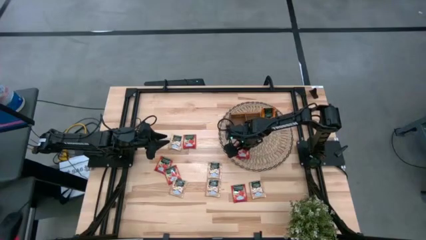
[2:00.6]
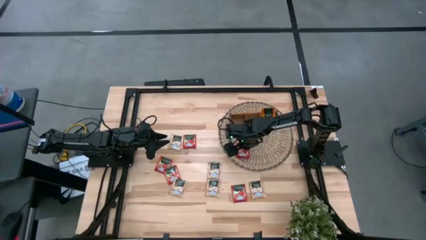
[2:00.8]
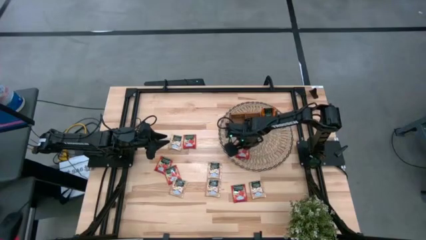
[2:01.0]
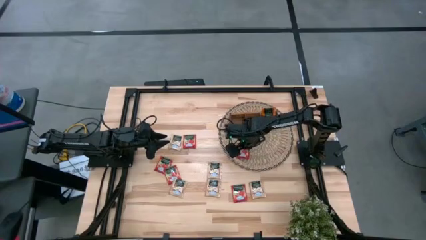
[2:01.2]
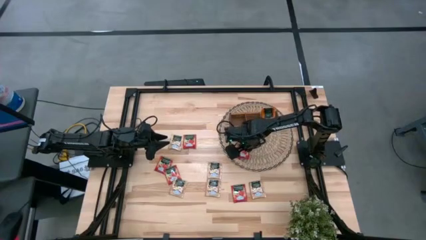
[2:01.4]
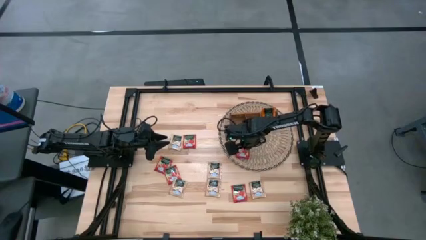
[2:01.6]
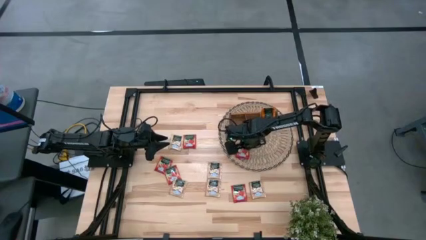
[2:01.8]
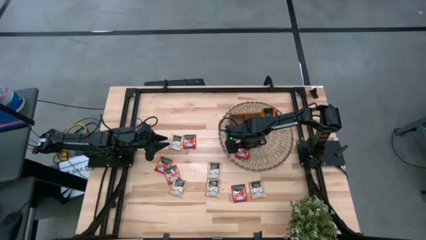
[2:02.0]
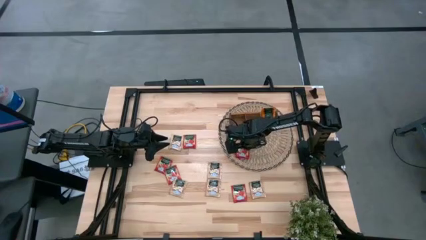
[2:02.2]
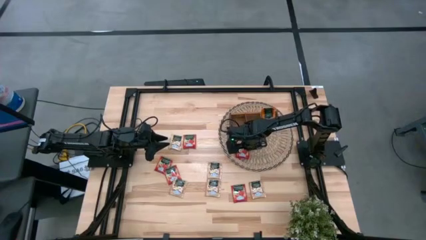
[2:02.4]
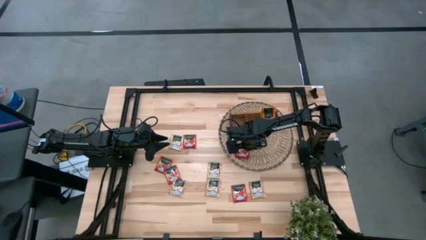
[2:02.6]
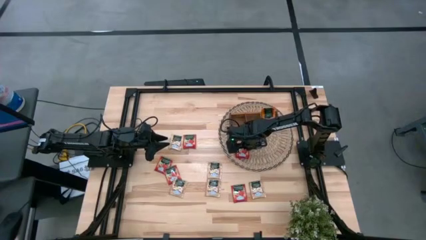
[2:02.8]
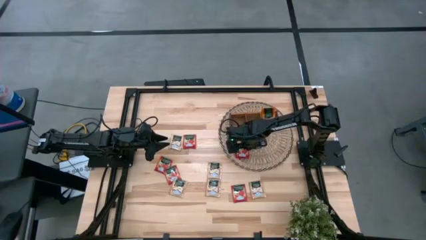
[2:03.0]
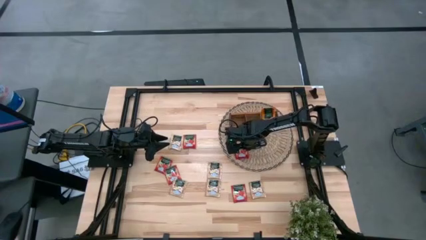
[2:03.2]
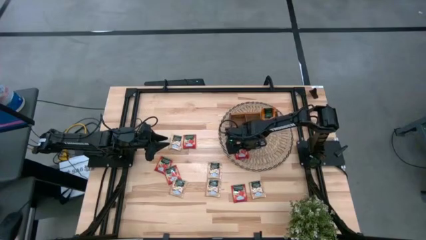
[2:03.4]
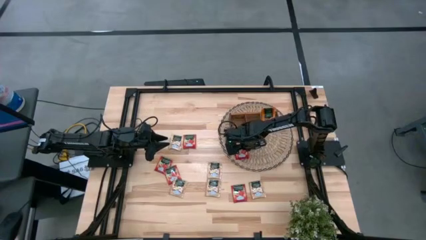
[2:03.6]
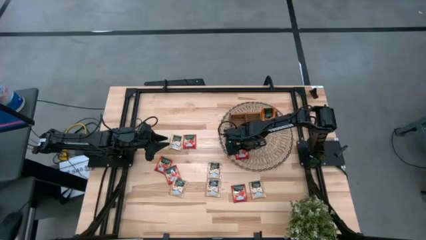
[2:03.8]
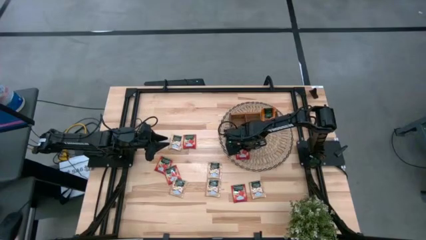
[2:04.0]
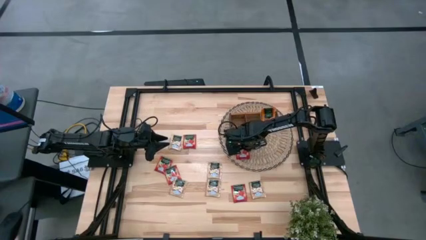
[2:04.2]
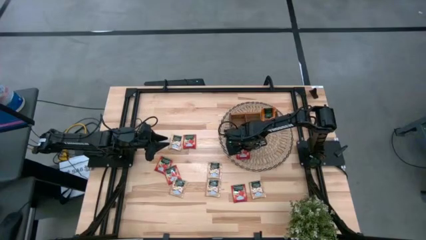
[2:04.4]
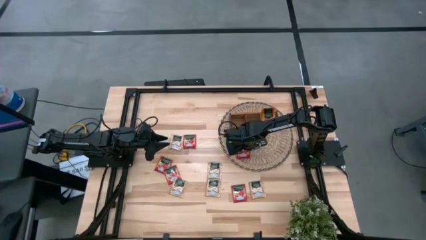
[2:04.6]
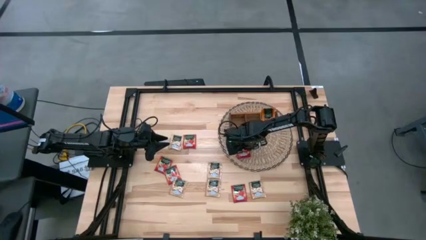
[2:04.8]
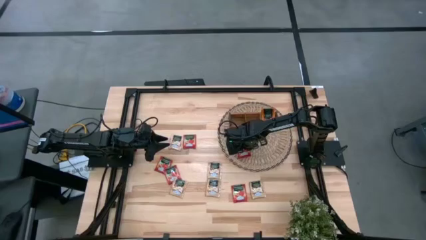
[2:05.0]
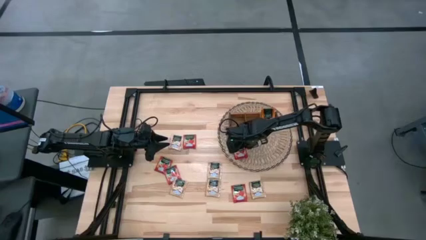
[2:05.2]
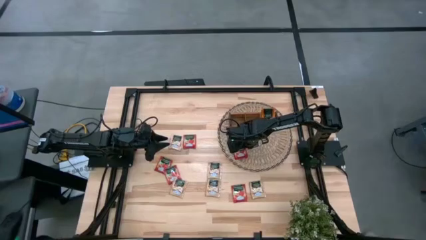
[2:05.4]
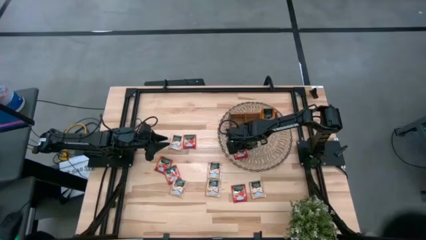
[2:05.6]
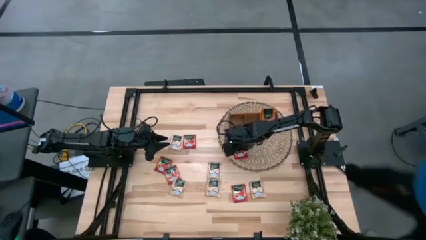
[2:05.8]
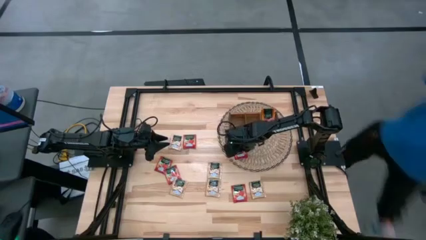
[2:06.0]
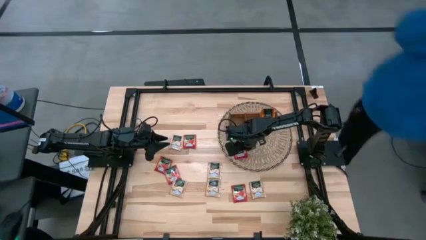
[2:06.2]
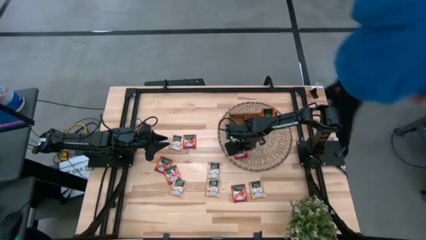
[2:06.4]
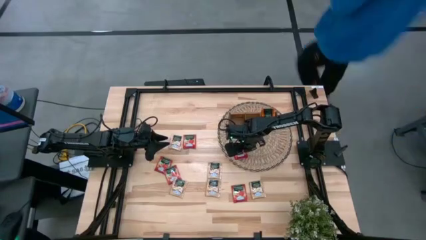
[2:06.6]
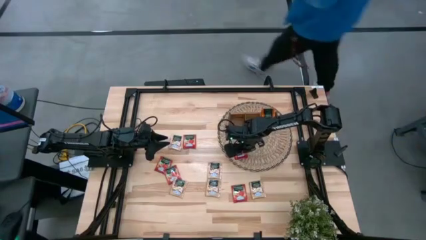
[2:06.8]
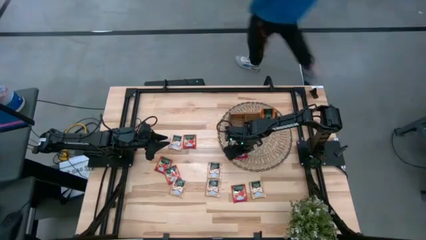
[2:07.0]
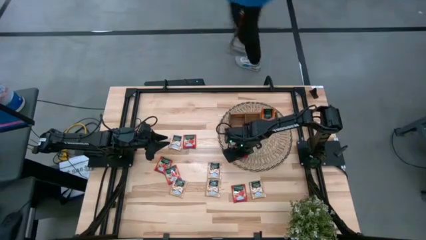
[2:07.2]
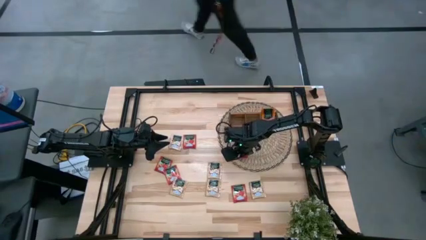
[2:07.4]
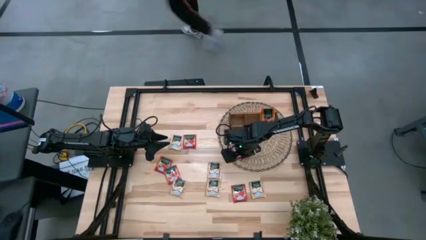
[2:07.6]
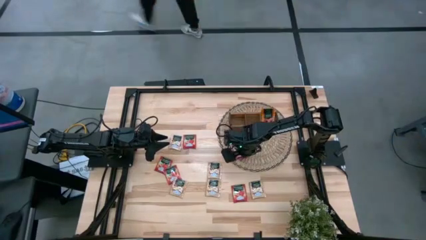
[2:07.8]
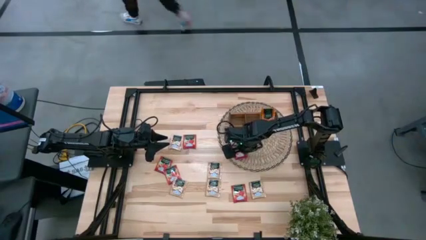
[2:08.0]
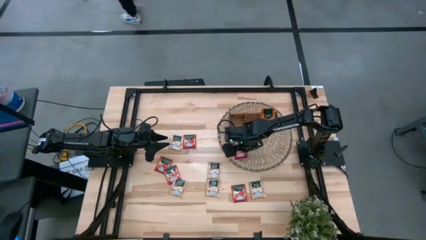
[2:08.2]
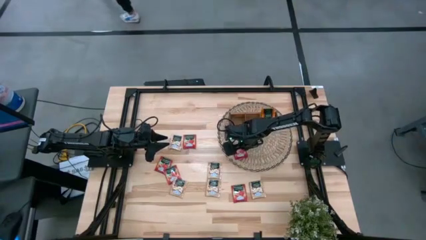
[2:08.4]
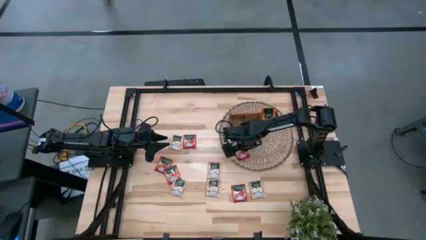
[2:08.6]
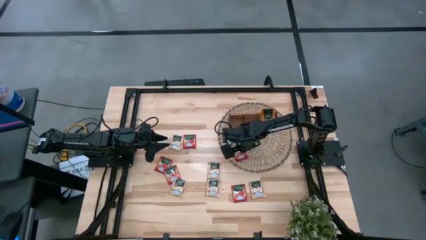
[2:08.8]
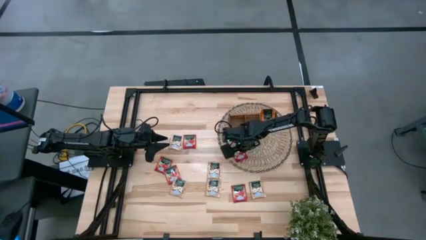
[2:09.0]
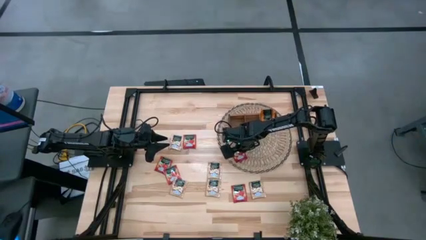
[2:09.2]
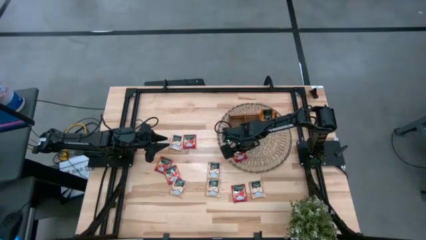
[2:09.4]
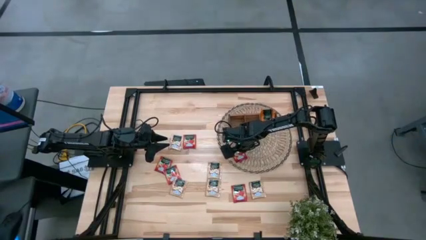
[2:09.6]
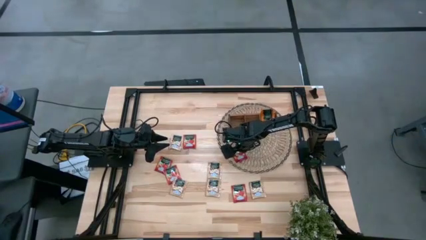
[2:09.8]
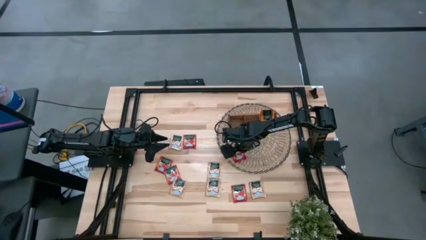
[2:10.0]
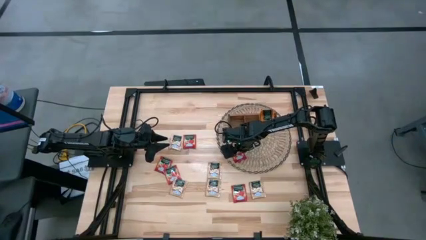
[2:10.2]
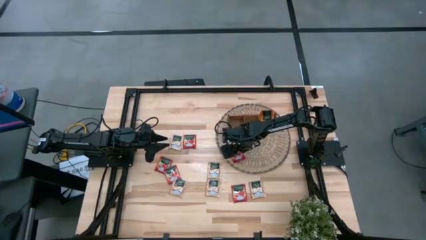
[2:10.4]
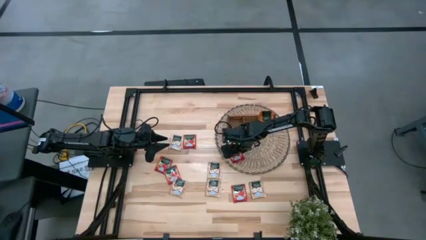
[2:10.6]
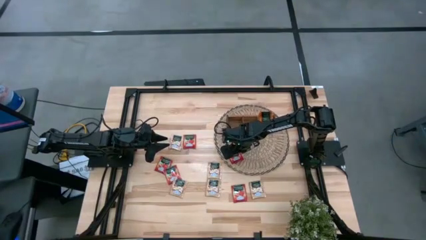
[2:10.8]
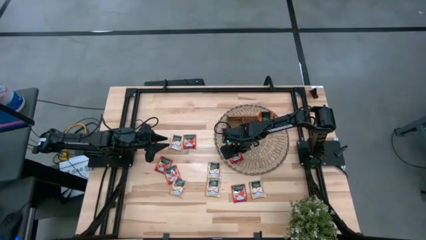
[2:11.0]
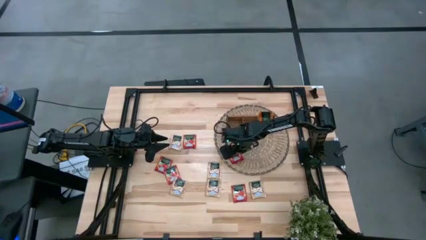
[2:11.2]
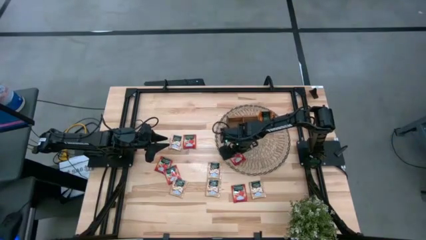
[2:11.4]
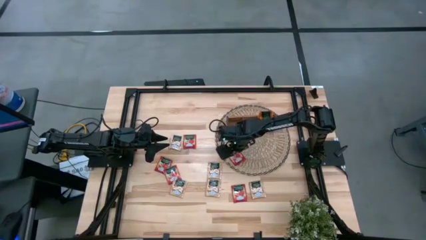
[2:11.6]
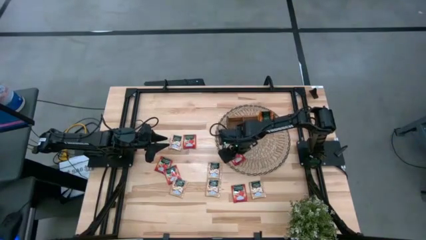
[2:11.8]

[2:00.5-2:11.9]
Task: Pick & Place Tea
Put the red tea pack into the middle compartment of the brown organizer
